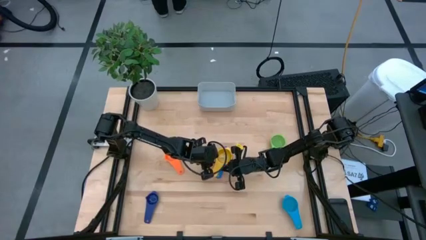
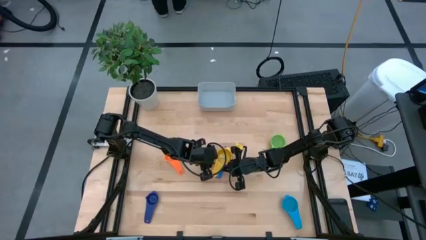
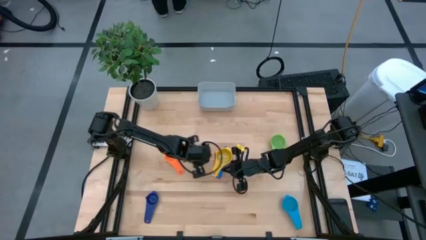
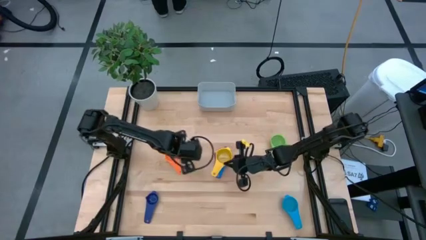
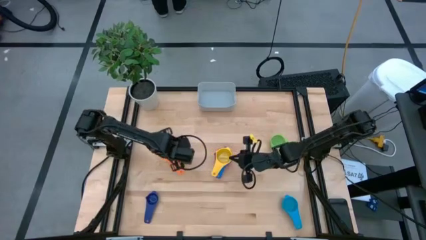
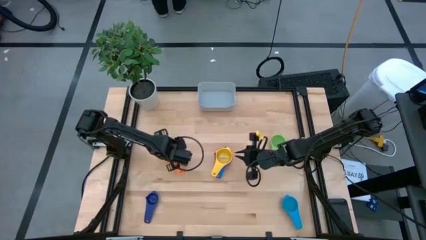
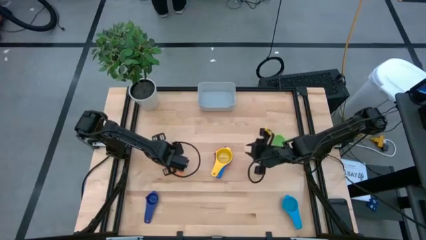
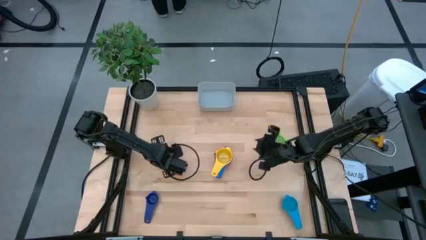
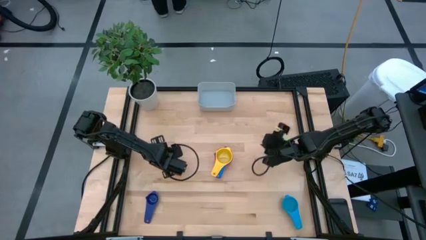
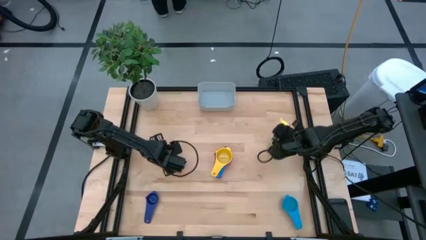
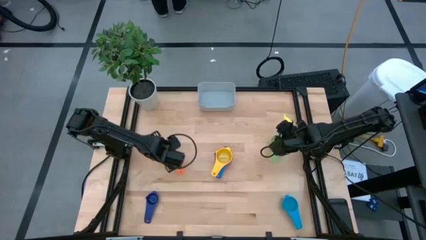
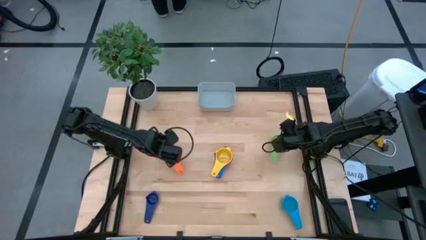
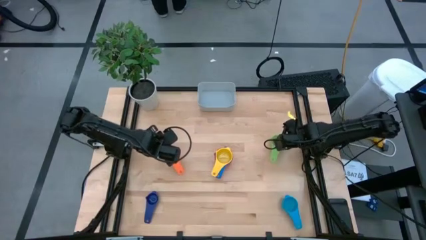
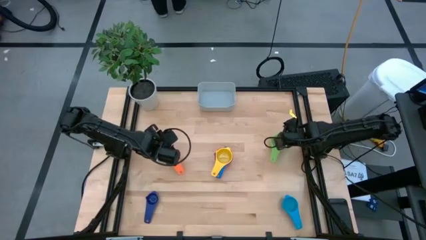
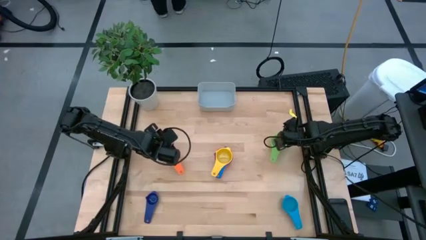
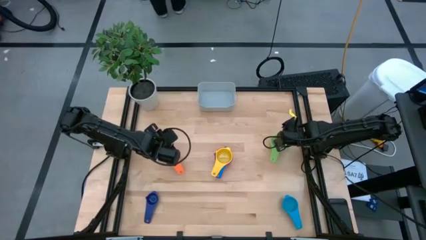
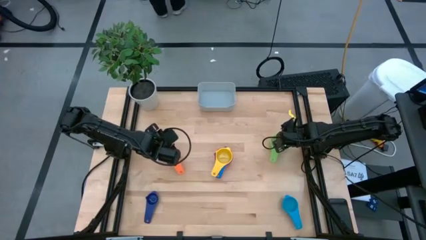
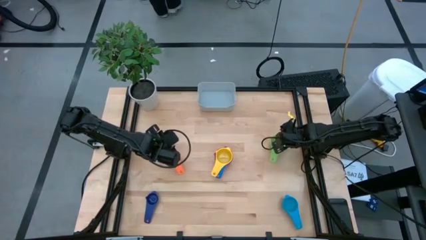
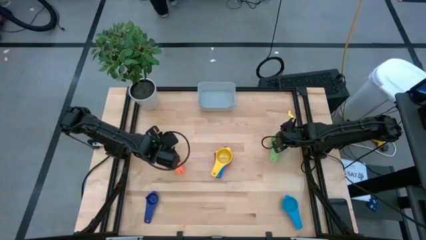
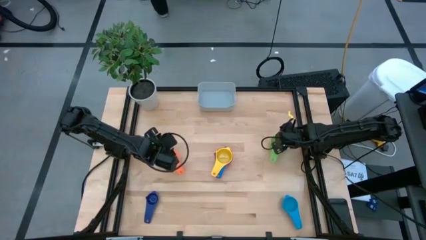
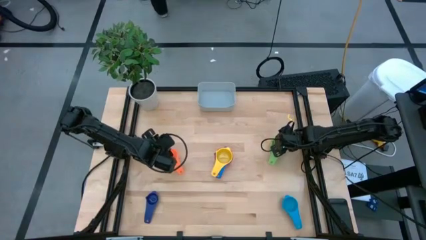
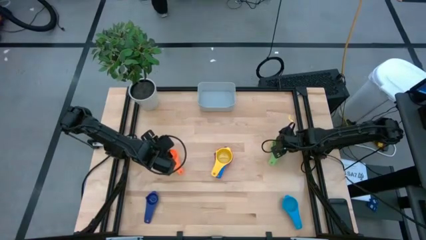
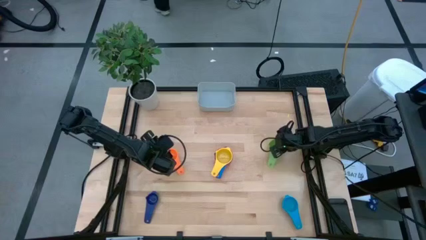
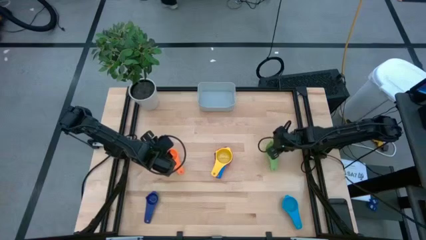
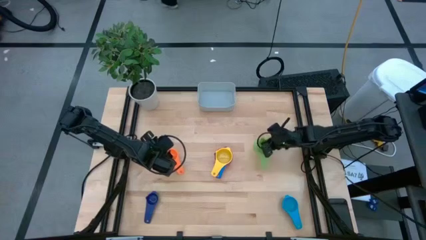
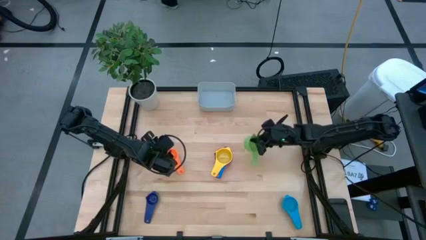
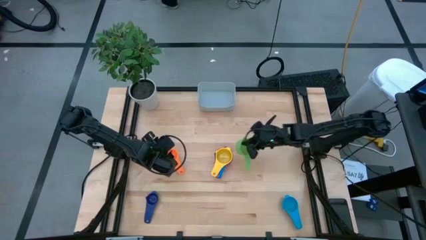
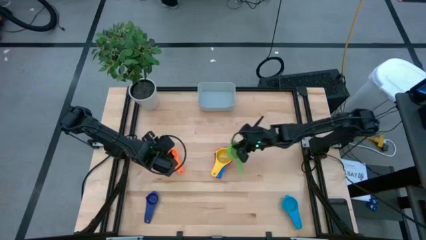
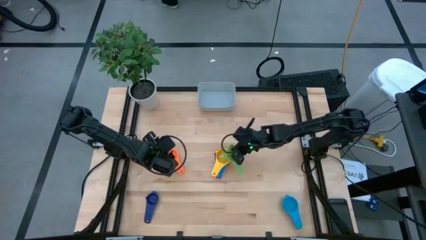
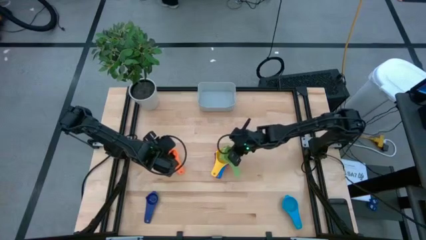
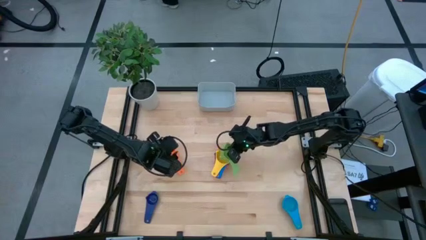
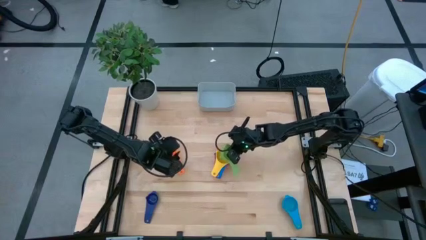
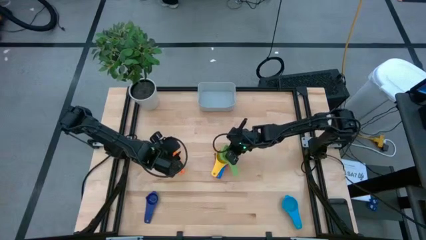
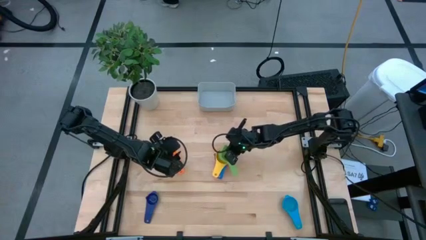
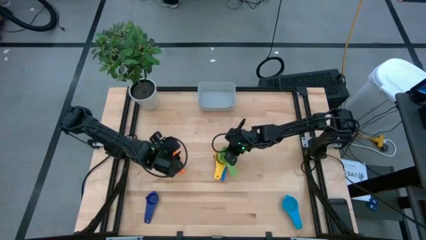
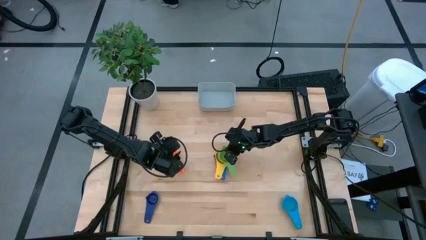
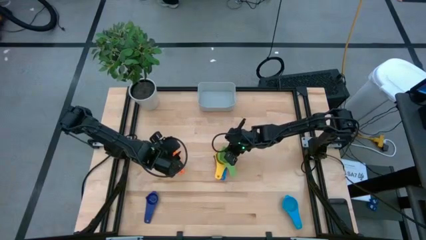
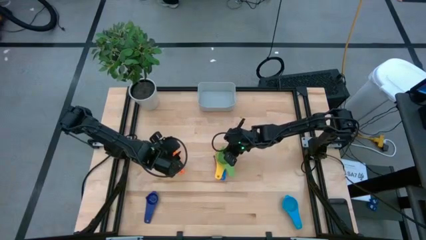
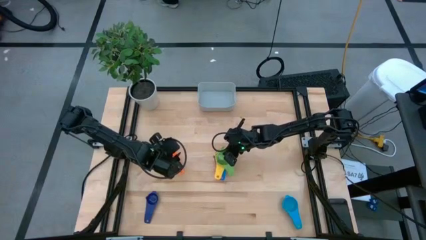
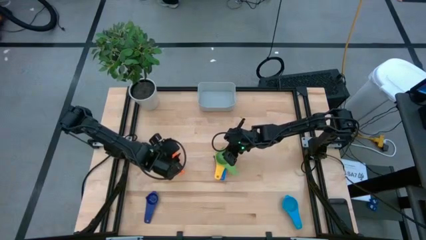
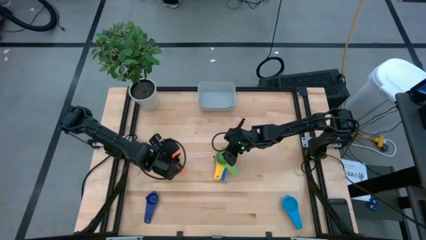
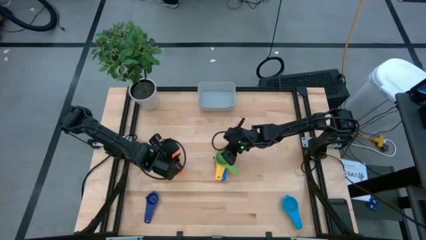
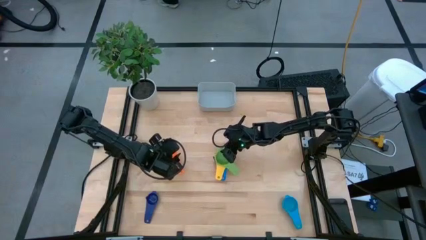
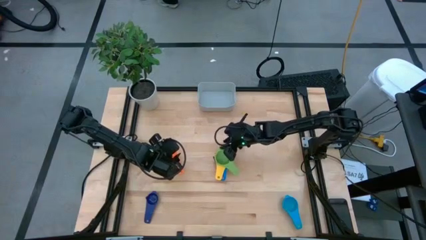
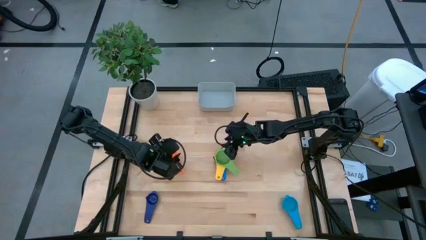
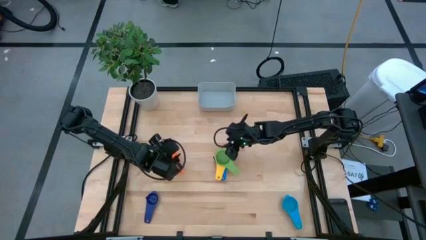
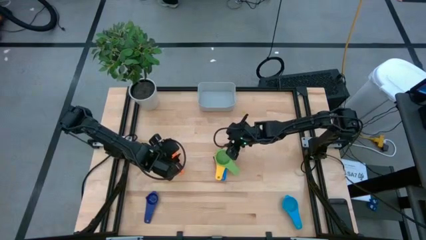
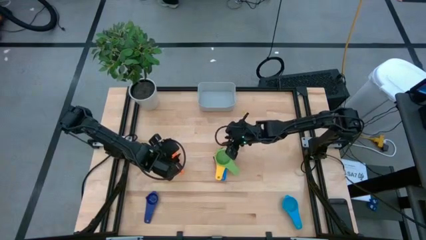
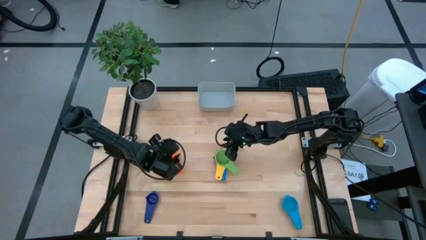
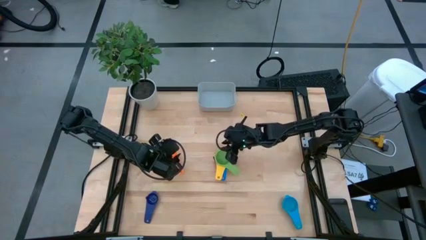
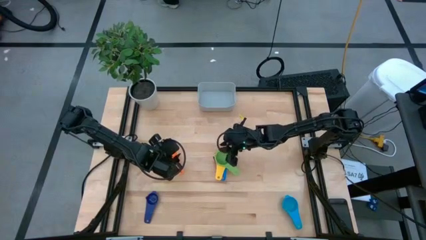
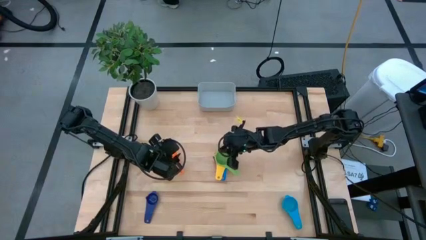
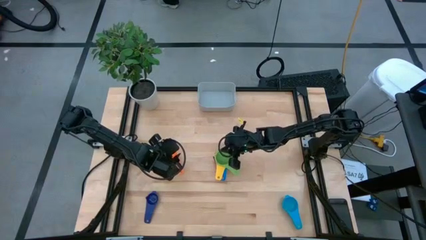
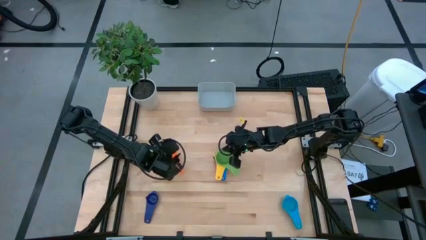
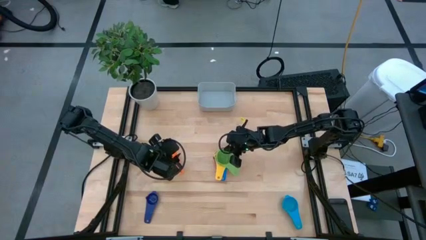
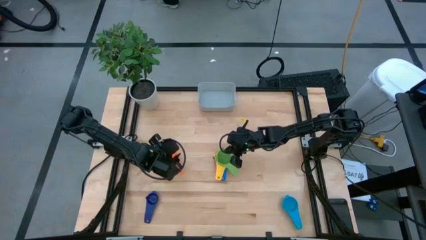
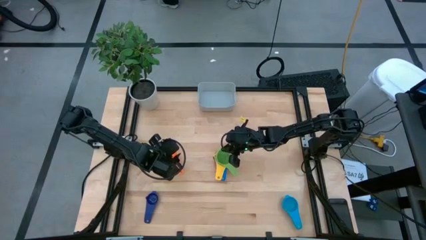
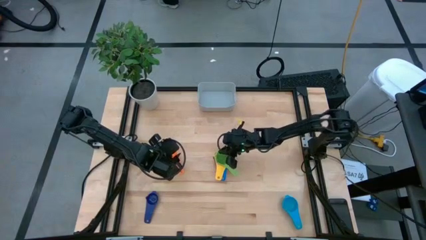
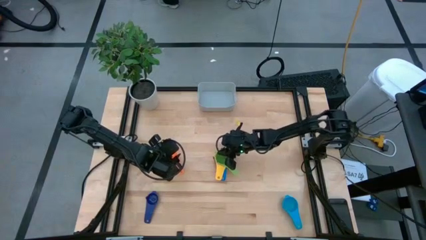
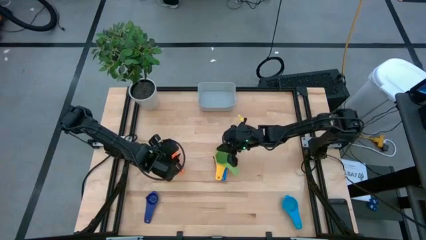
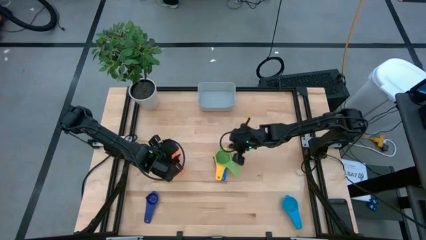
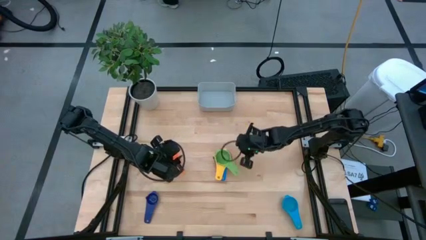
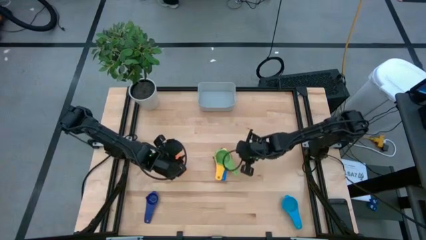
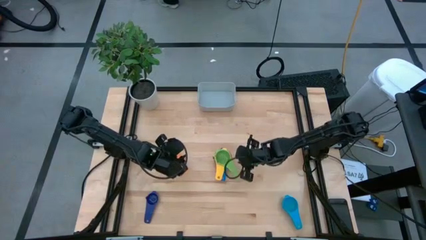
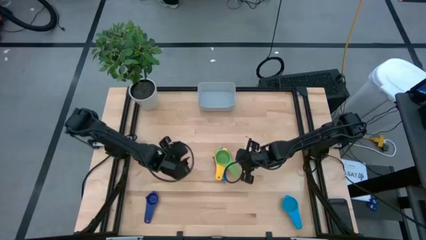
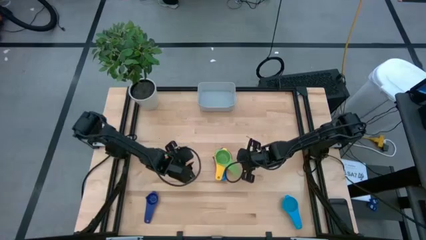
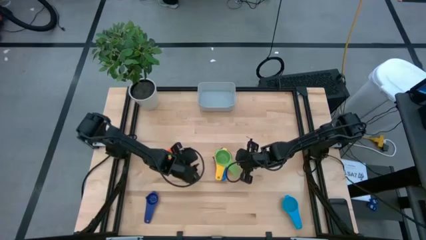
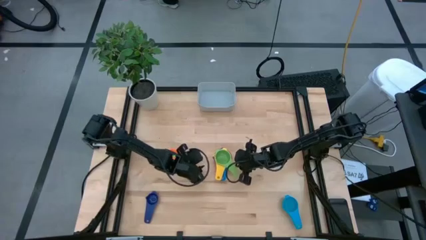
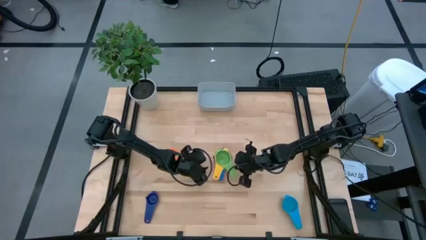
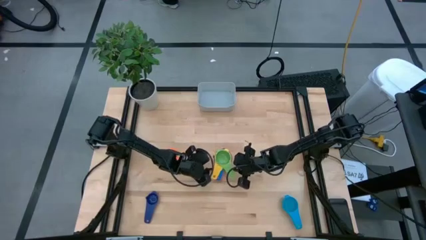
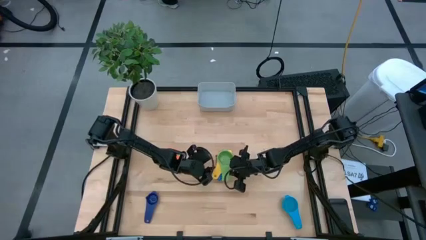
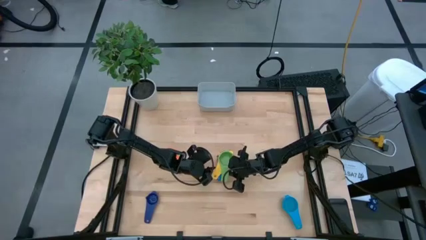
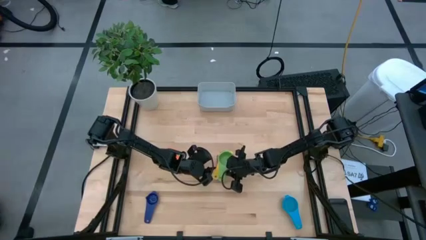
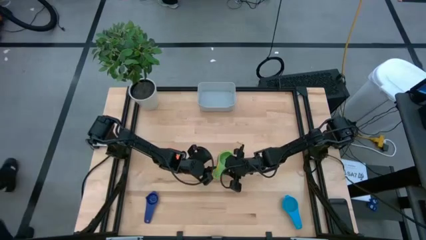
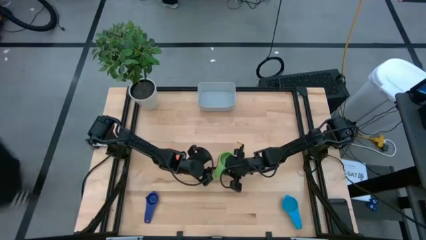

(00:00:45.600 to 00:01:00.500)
Task: Nest measuring cups in basket
Stack the green measuring cup on top of the yellow measuring cup
